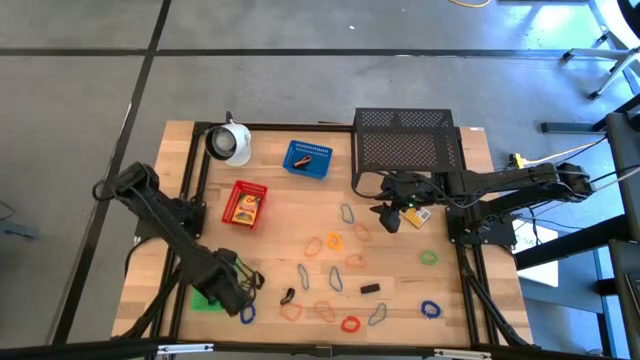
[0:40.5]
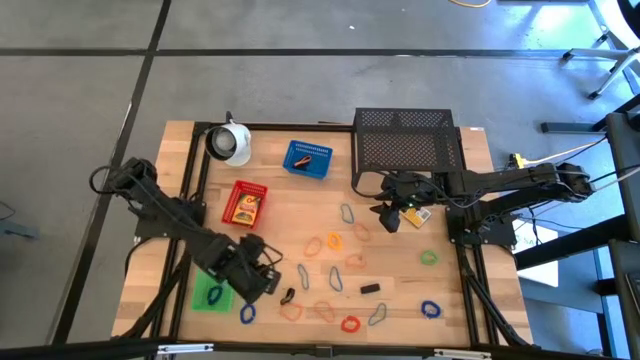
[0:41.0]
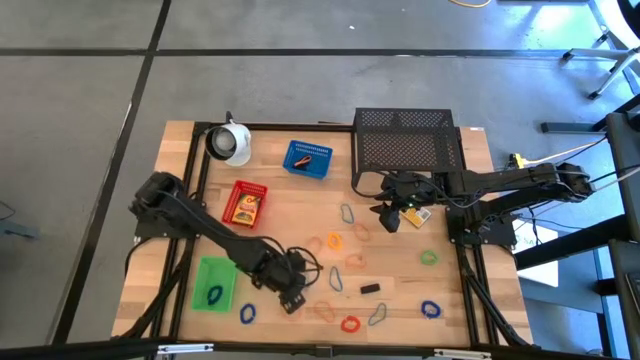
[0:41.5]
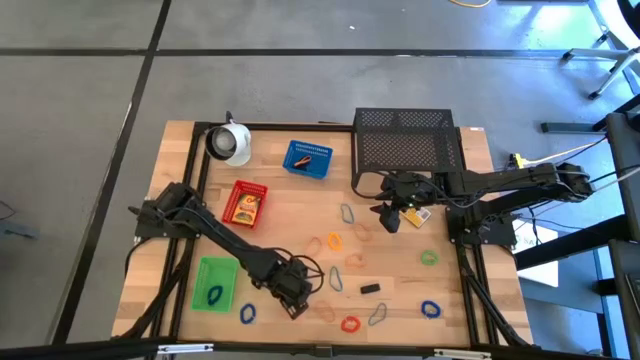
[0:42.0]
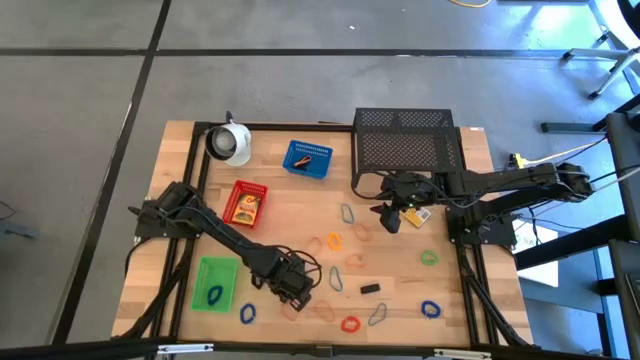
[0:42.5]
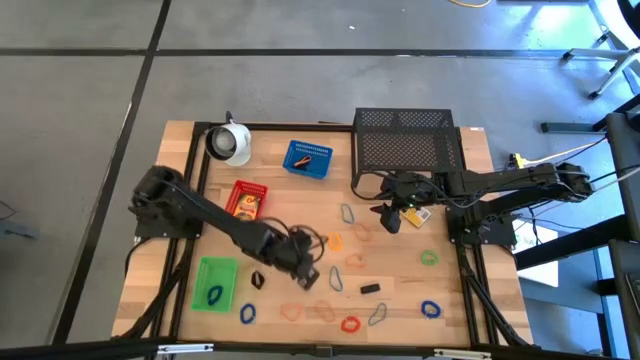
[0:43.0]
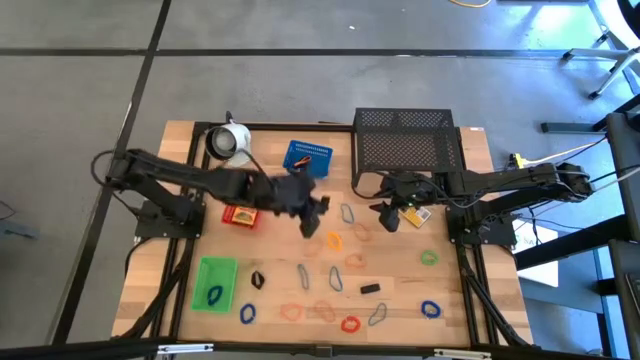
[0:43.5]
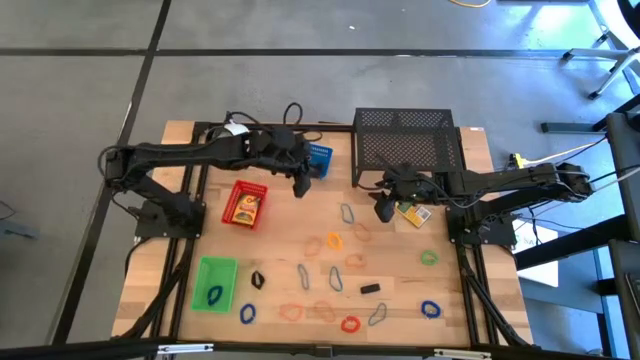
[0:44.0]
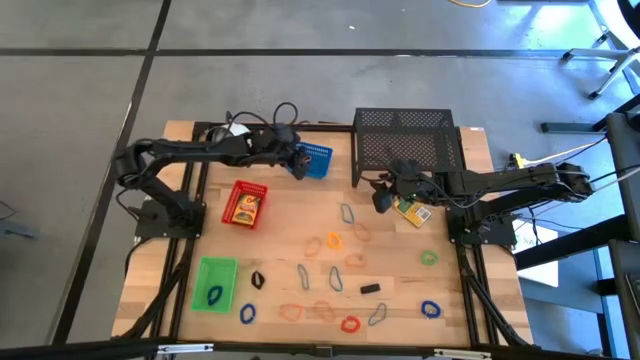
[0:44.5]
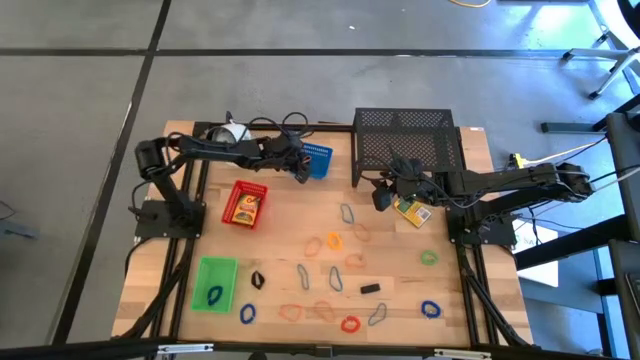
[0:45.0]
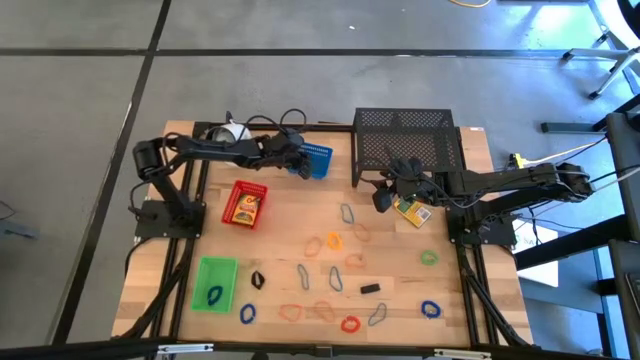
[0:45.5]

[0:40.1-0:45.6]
Task: Pick & Place Office Desk Supplies
Put the black rubber band into the blue bin

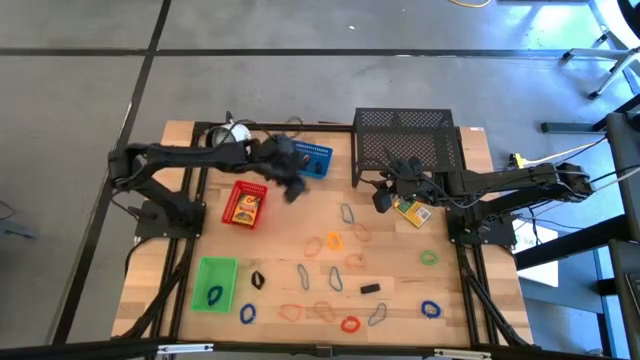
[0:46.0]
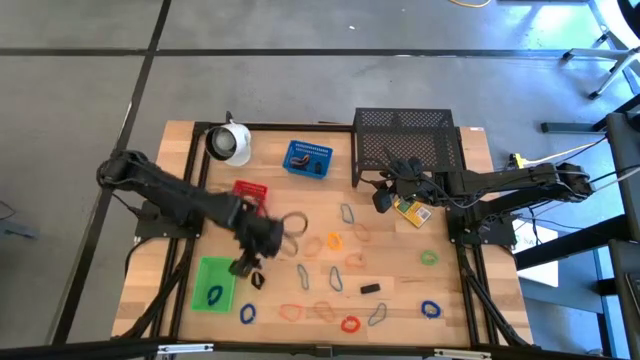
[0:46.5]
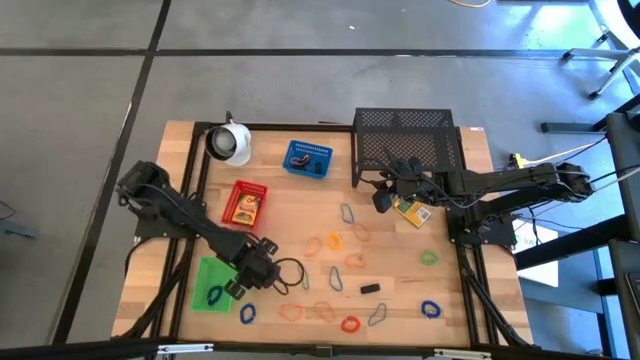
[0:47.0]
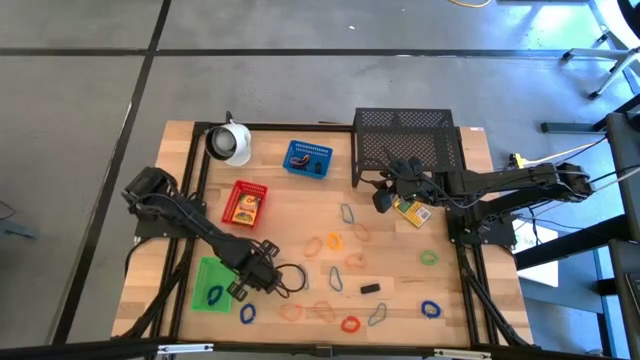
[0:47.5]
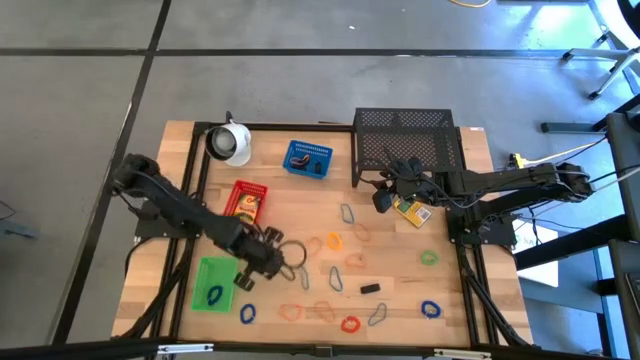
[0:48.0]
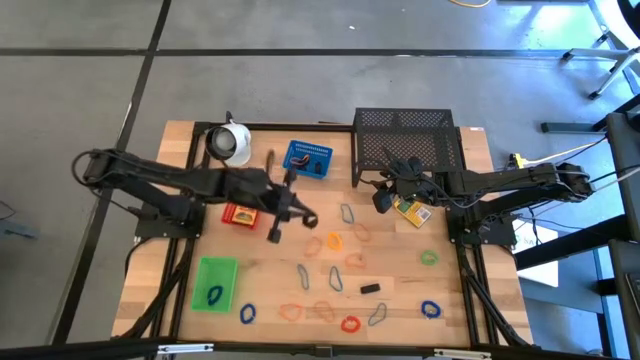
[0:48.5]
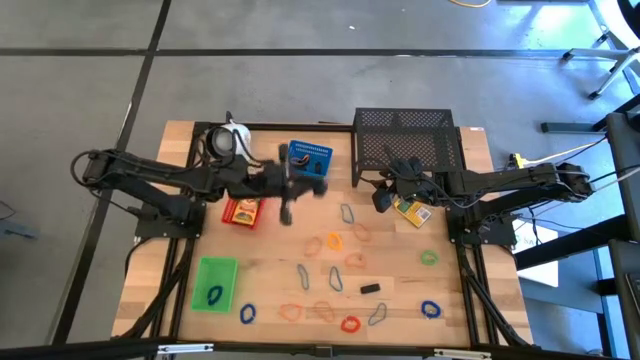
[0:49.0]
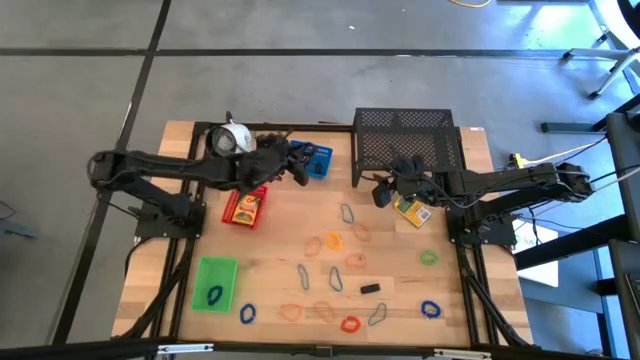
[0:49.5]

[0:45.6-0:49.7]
Put the black rubber band into the blue bin

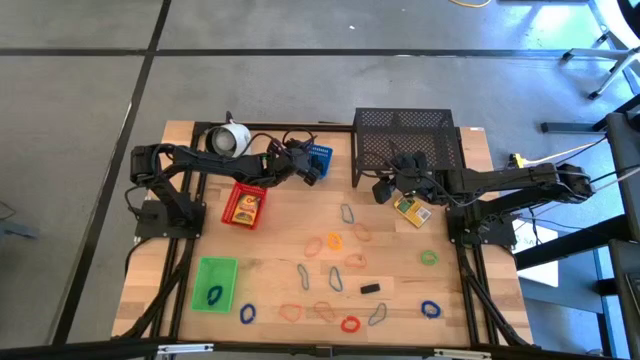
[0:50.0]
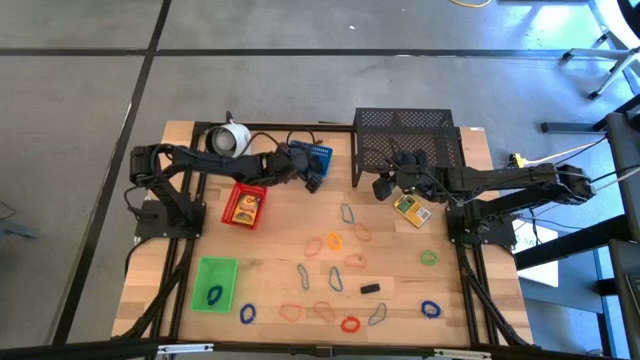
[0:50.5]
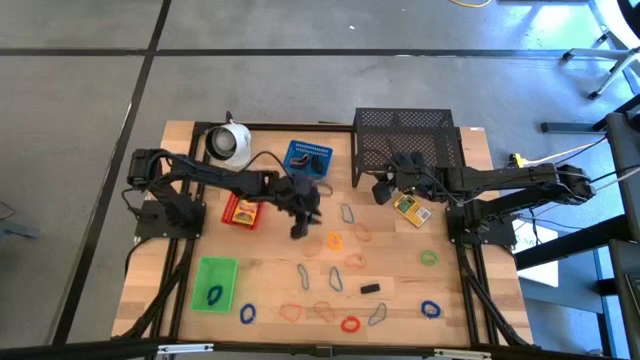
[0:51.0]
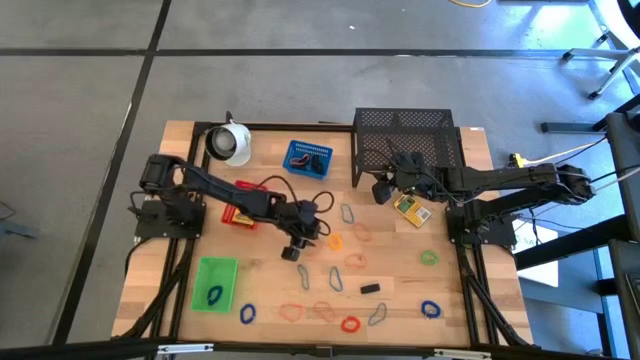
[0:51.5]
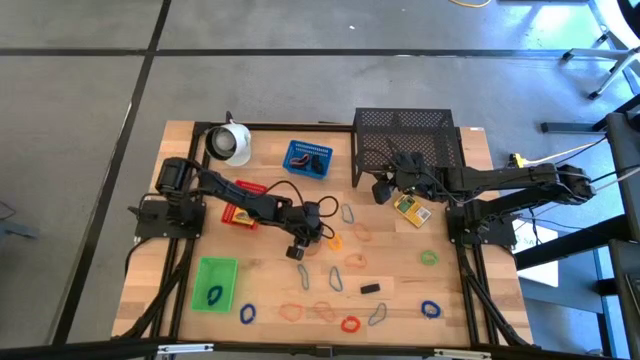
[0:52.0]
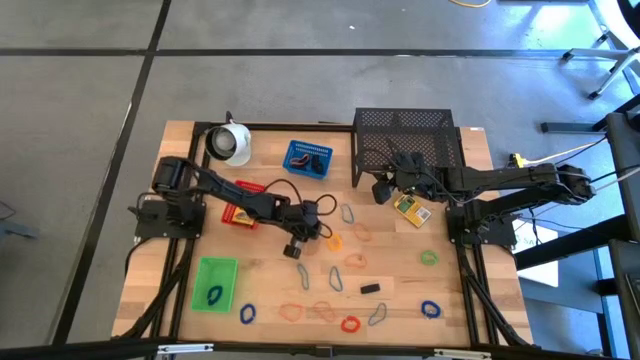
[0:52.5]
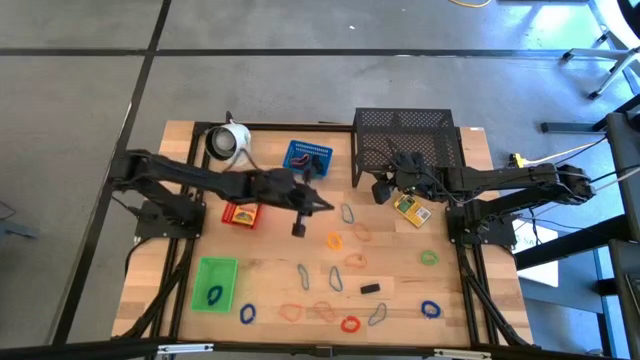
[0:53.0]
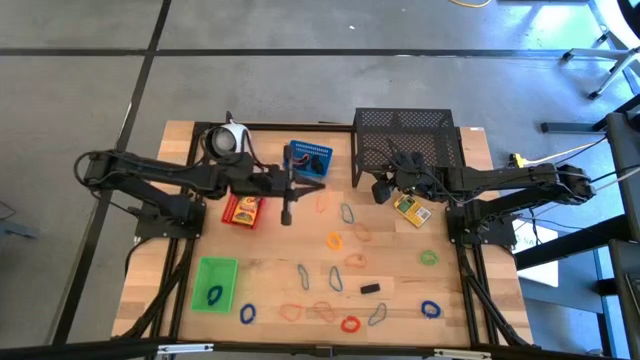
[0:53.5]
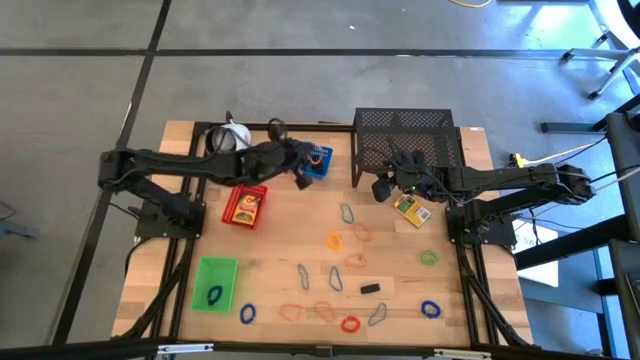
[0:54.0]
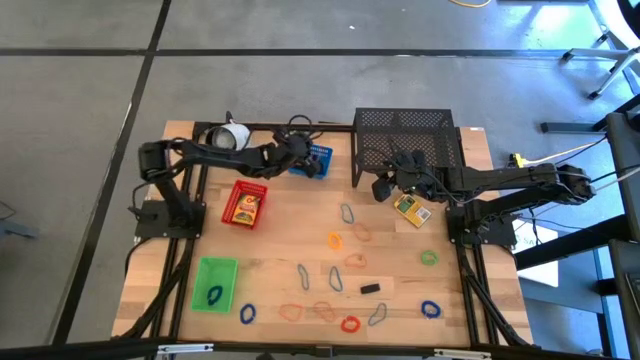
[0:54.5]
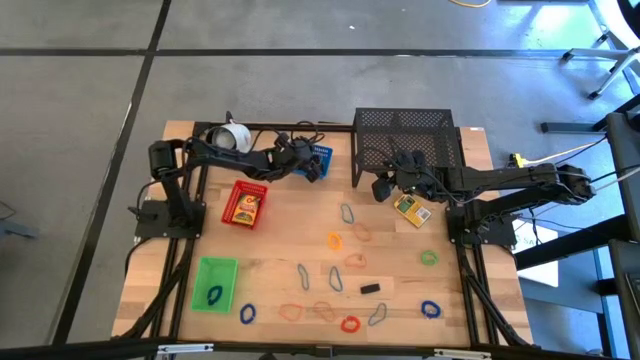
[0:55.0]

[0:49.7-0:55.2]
Put the orange rubber band into the blue bin

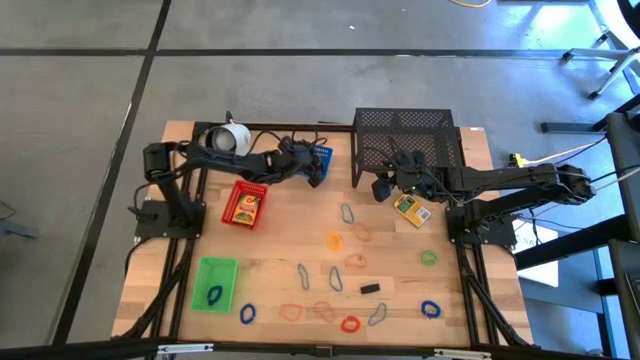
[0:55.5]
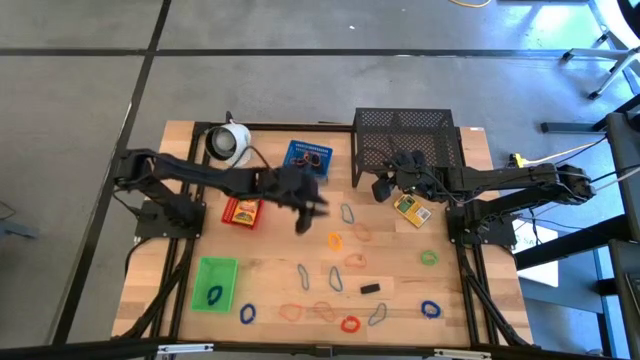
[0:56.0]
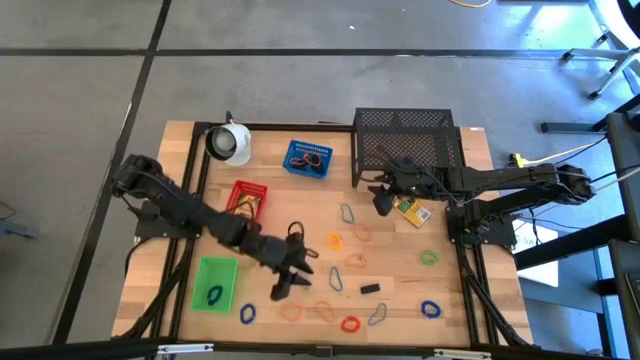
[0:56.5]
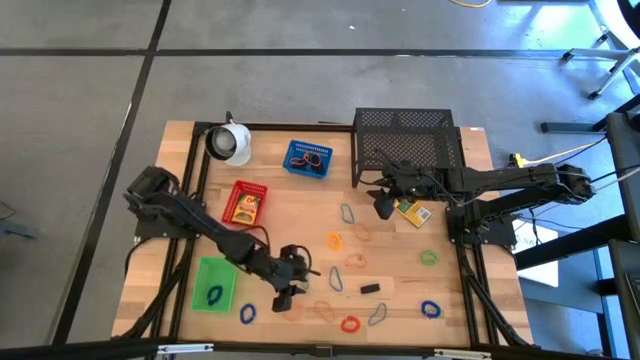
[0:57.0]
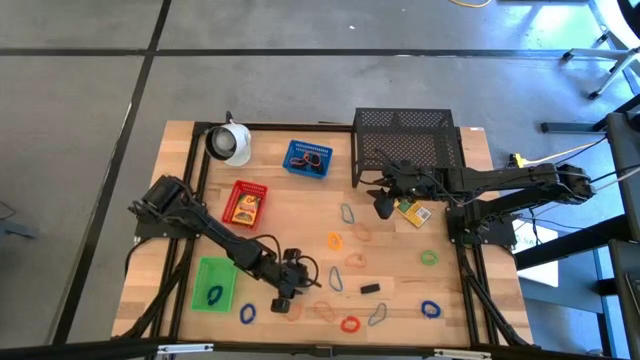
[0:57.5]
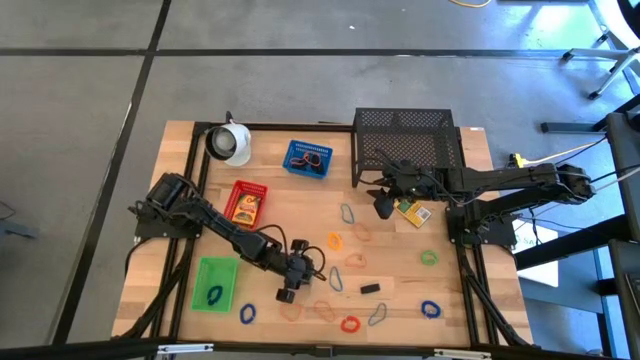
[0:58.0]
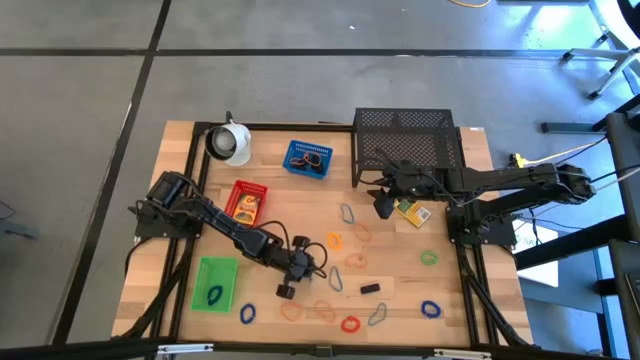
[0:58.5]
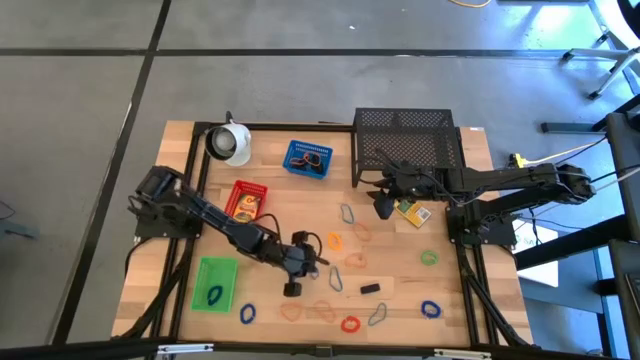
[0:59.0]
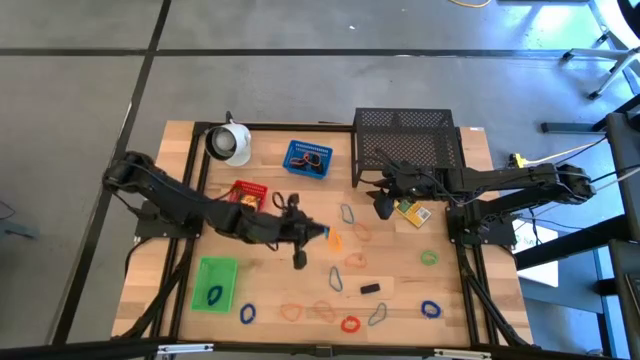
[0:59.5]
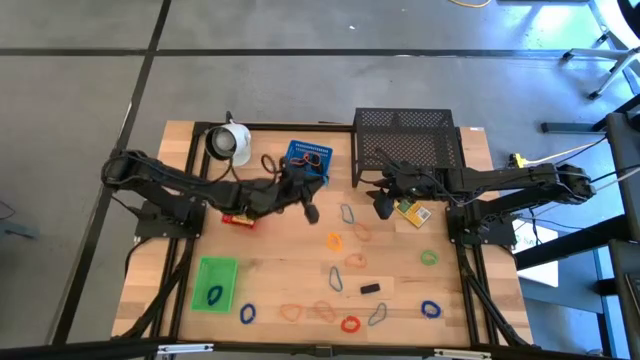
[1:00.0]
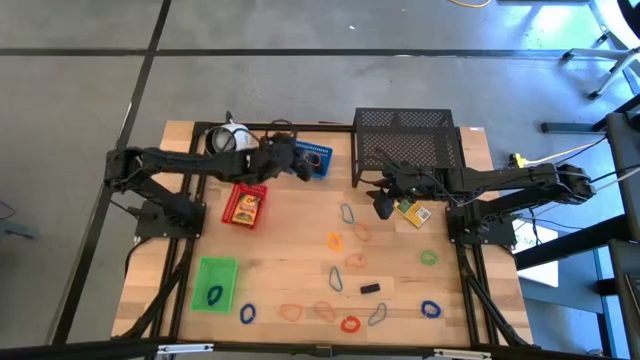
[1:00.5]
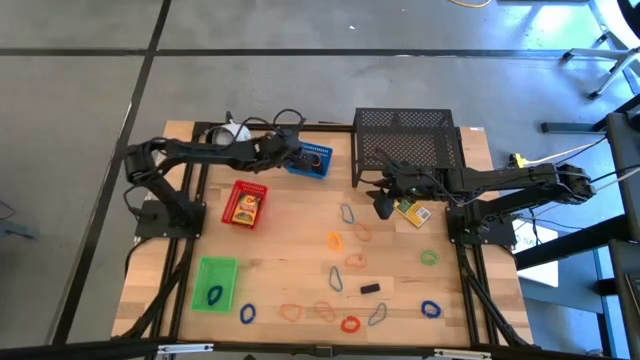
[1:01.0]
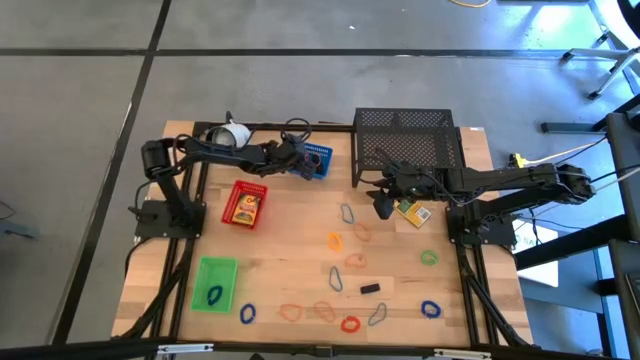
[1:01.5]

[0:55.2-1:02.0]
Put the blue rubber band into the blue bin
